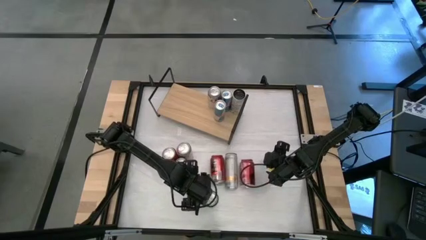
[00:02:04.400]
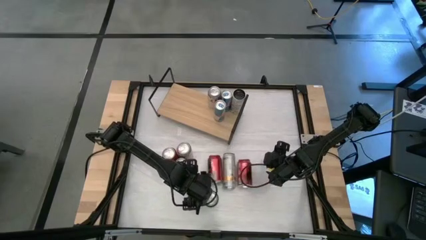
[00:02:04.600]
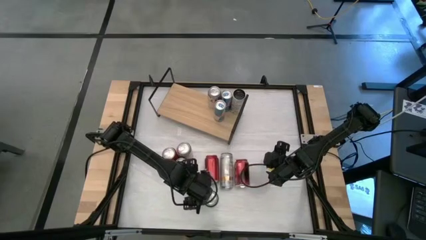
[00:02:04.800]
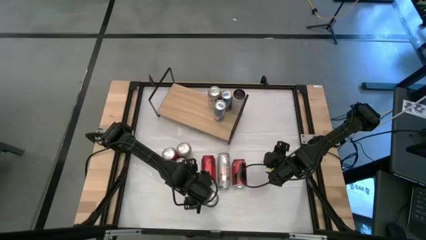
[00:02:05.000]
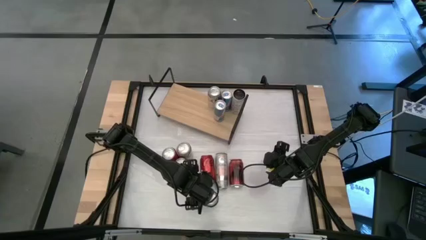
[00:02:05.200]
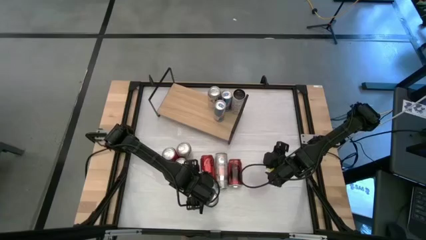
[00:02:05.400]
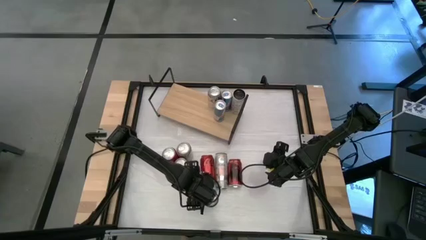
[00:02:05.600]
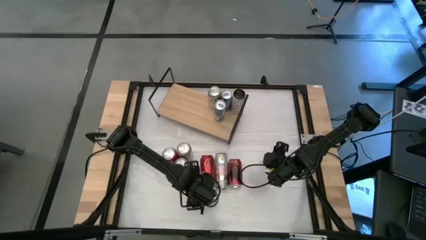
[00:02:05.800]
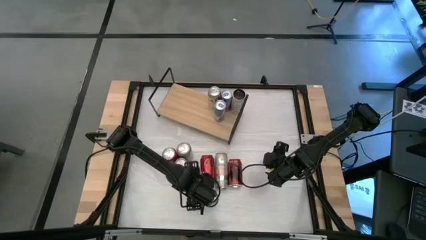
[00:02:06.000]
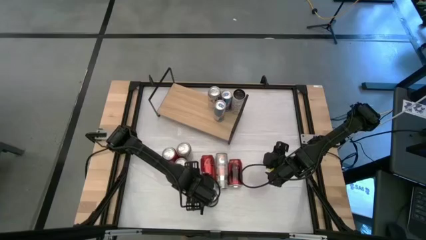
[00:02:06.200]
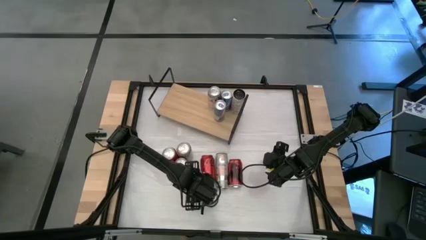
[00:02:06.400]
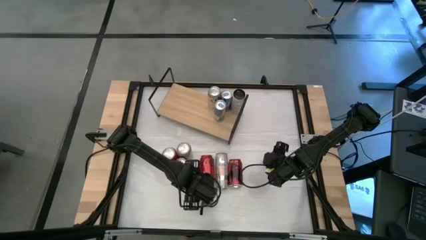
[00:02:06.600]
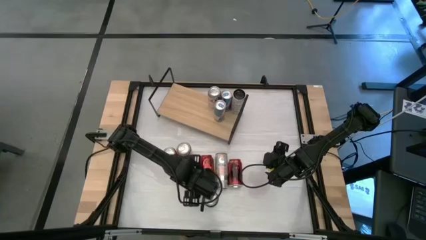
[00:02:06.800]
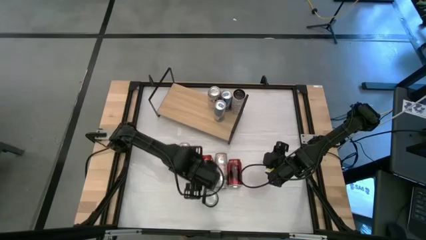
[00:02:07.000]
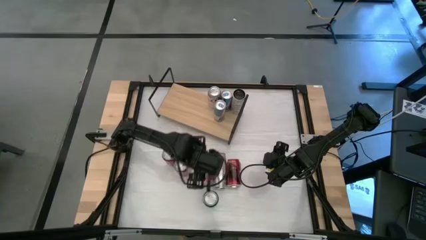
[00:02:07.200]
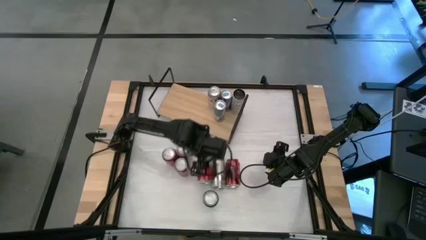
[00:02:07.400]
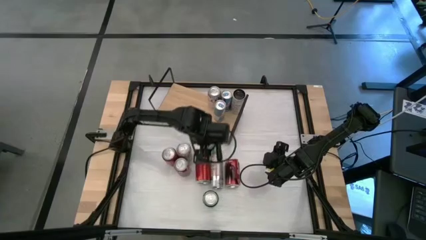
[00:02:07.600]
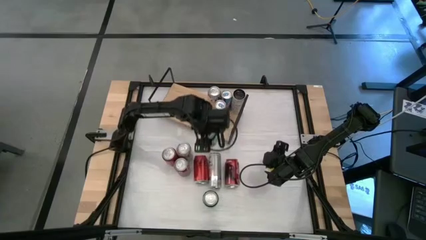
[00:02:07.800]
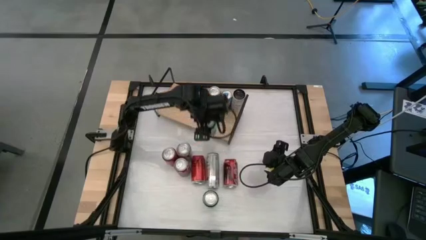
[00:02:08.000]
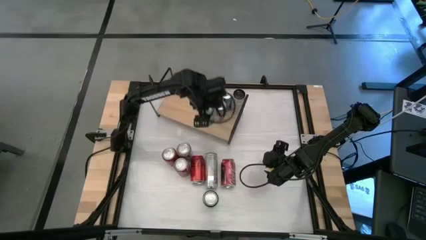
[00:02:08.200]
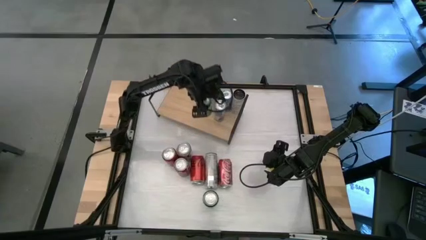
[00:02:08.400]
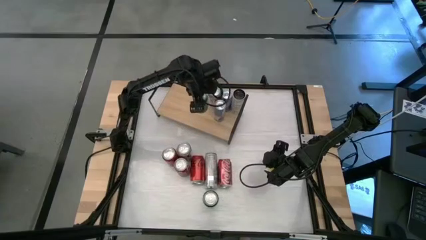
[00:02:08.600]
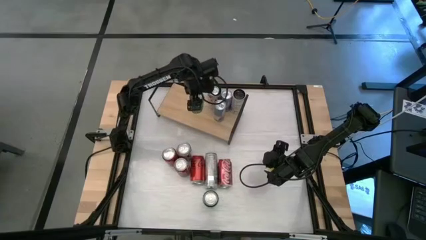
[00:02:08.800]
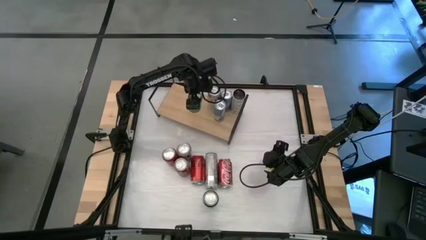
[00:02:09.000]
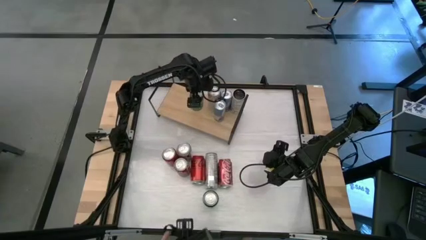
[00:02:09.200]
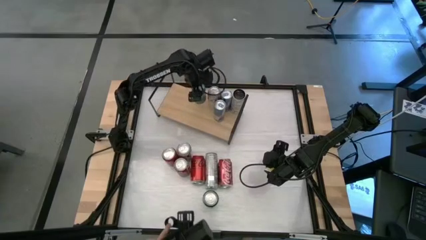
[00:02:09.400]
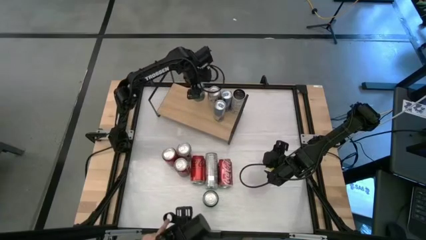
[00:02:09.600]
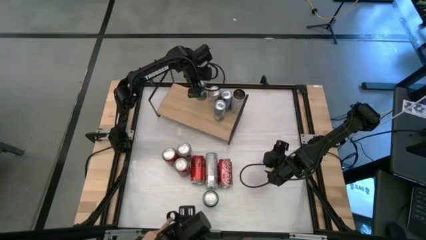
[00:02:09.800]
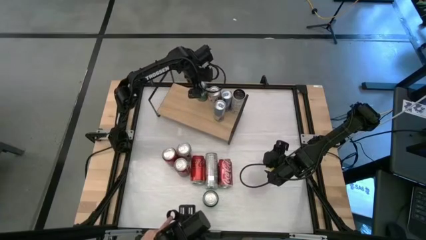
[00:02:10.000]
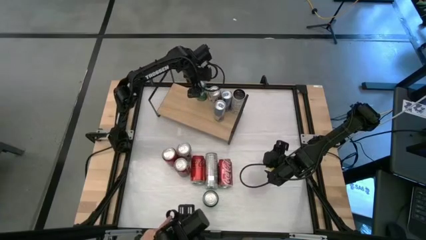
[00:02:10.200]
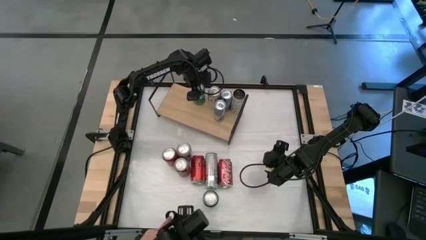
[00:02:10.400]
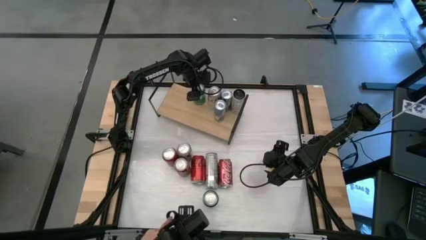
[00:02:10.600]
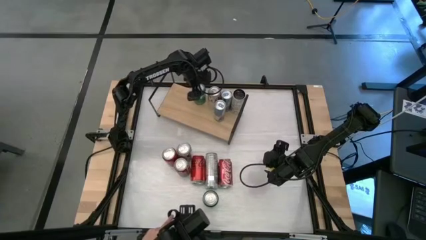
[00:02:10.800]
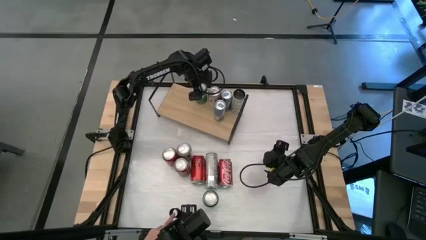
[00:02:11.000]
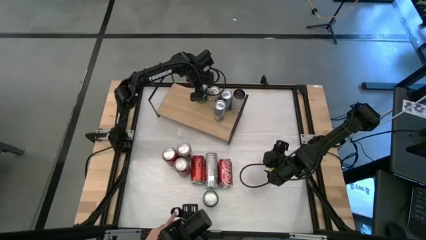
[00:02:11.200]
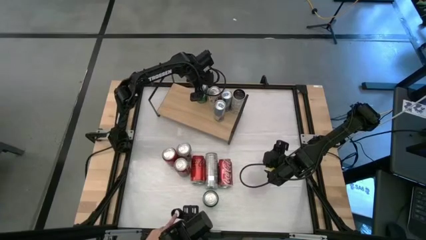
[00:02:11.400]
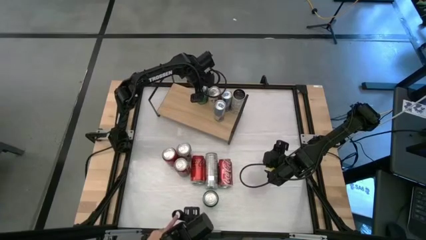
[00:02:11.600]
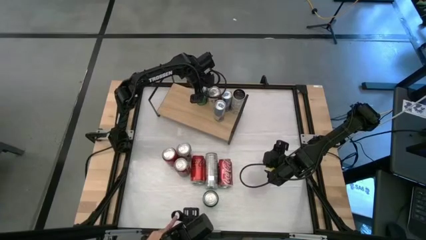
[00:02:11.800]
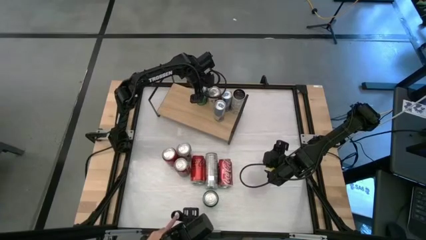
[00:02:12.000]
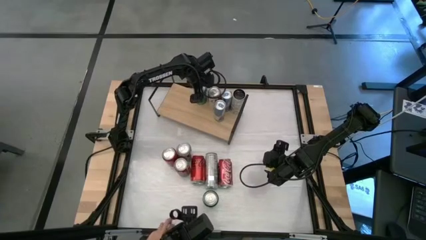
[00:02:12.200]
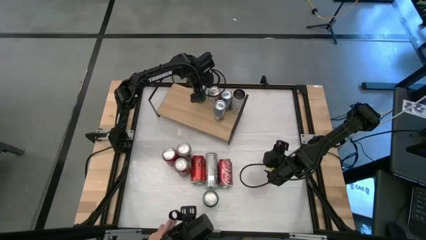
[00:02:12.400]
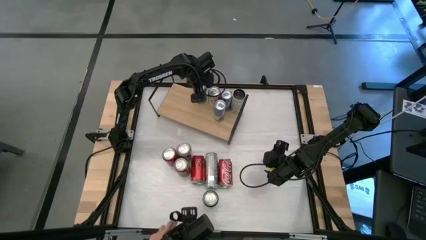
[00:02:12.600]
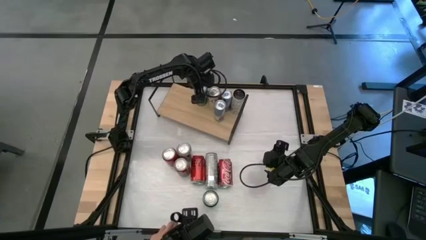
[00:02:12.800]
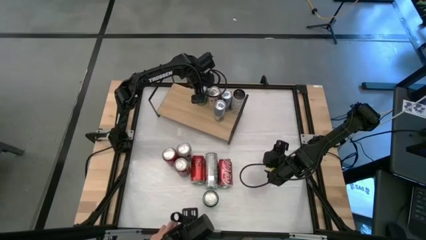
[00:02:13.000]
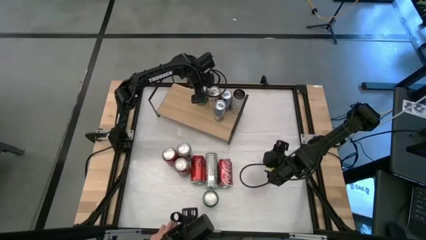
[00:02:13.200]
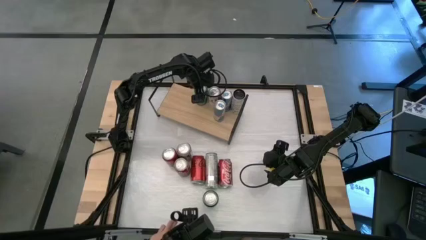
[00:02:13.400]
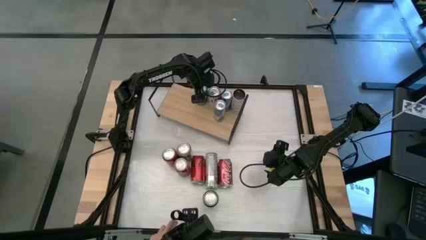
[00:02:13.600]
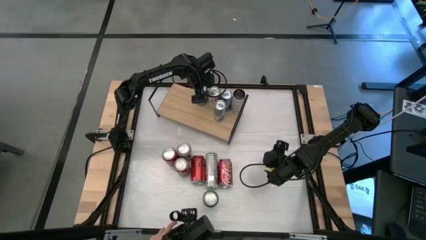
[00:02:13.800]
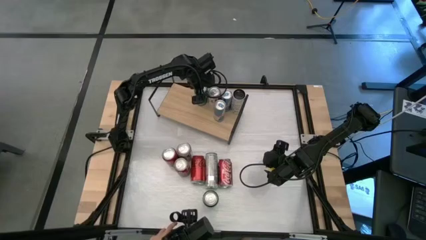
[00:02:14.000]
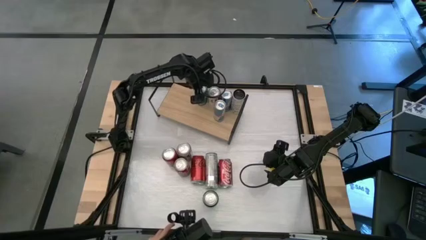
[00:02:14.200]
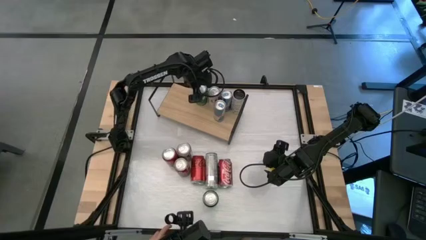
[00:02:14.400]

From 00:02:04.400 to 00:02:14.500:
Task: Place canned beverage on shelf
Put the left green soda can on the shelf

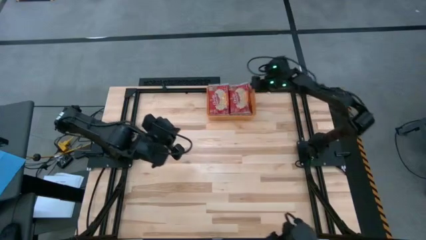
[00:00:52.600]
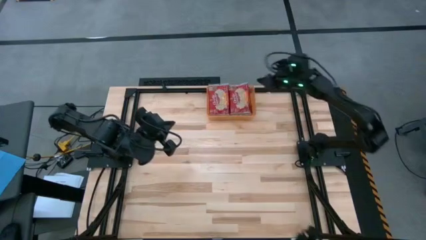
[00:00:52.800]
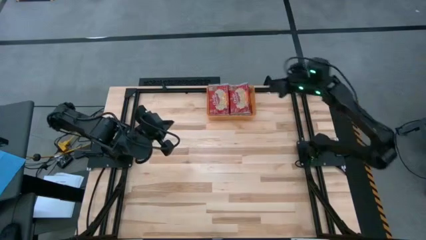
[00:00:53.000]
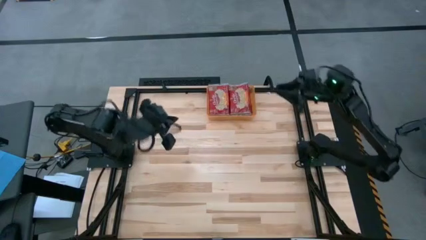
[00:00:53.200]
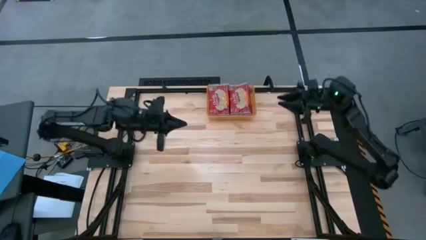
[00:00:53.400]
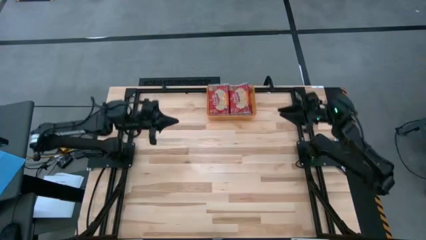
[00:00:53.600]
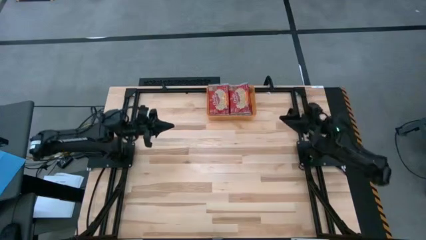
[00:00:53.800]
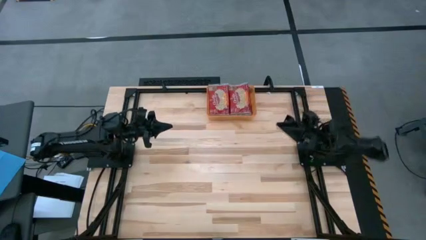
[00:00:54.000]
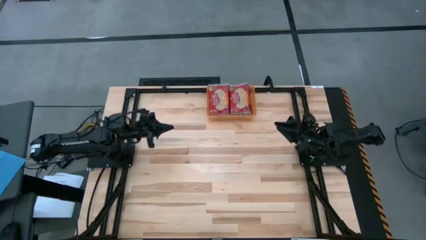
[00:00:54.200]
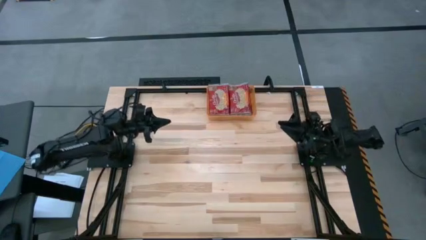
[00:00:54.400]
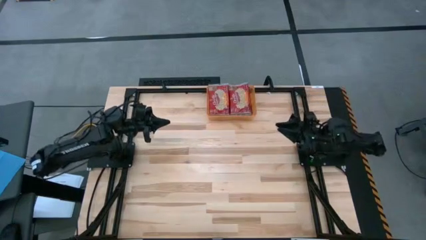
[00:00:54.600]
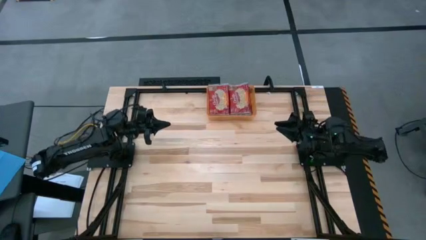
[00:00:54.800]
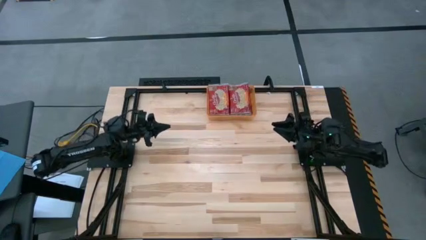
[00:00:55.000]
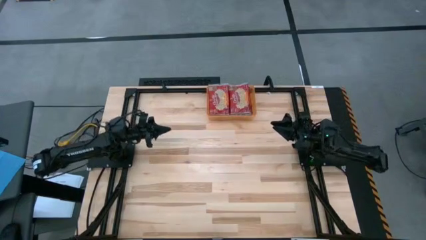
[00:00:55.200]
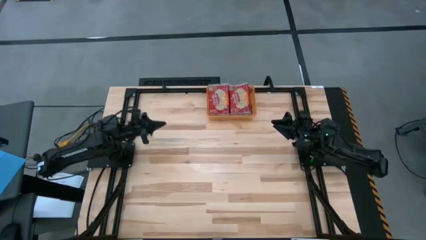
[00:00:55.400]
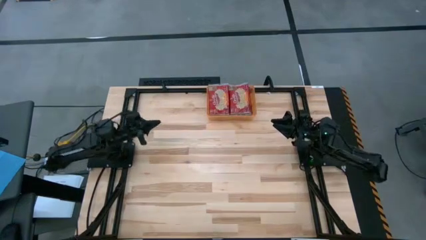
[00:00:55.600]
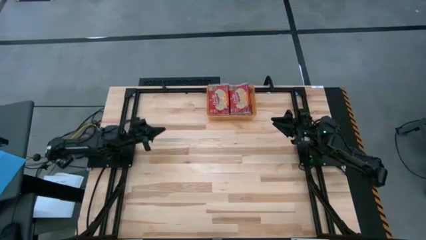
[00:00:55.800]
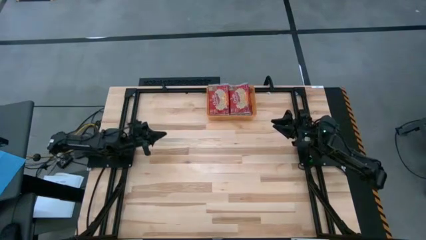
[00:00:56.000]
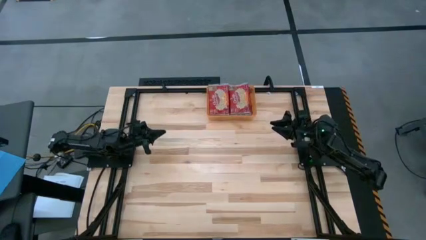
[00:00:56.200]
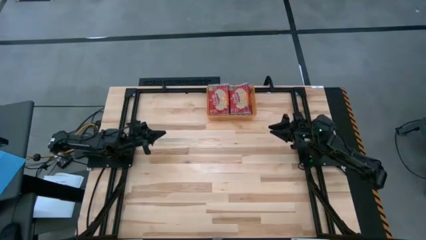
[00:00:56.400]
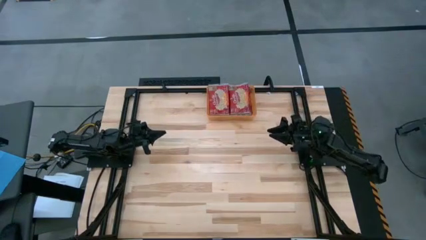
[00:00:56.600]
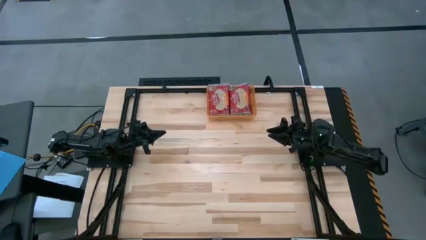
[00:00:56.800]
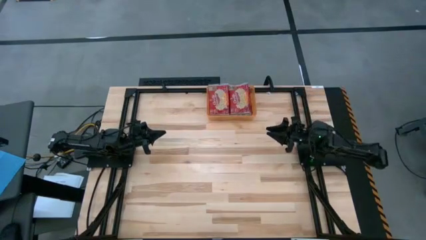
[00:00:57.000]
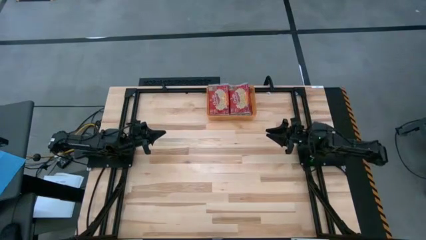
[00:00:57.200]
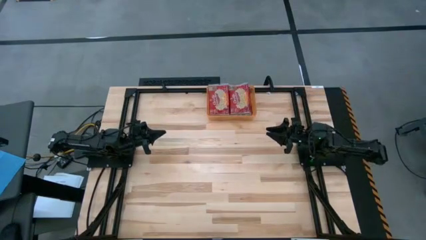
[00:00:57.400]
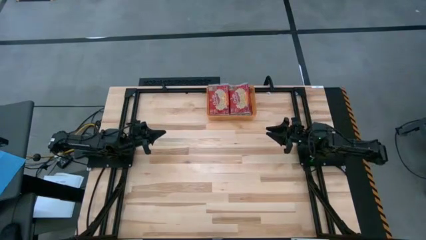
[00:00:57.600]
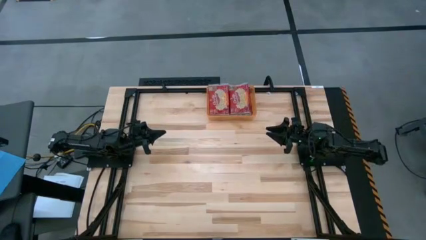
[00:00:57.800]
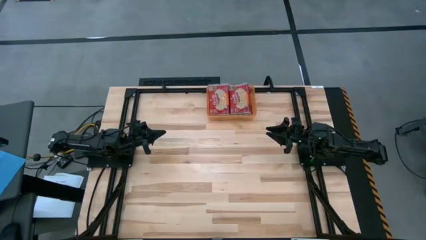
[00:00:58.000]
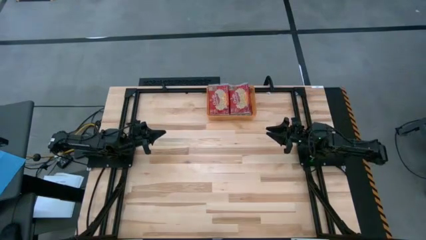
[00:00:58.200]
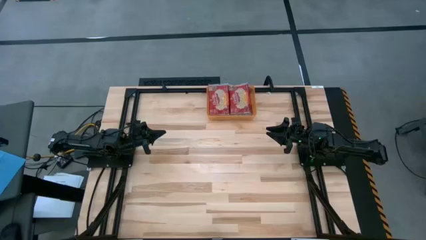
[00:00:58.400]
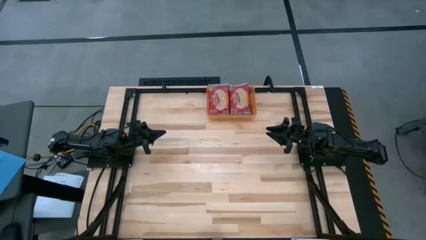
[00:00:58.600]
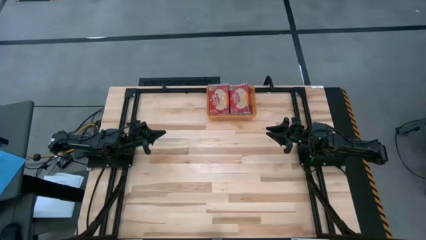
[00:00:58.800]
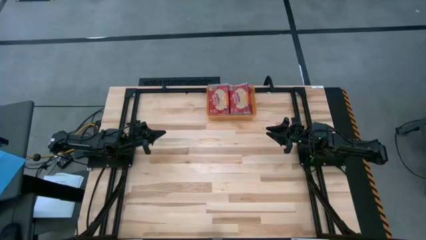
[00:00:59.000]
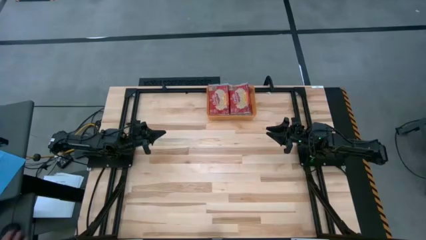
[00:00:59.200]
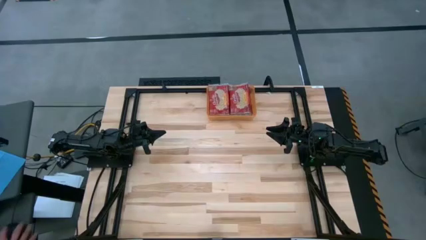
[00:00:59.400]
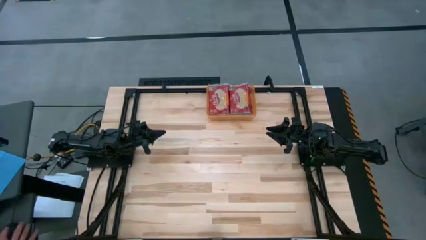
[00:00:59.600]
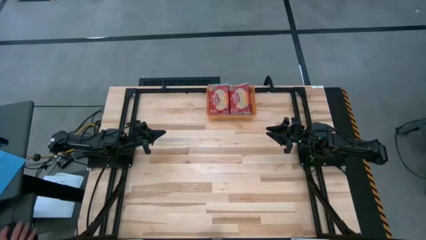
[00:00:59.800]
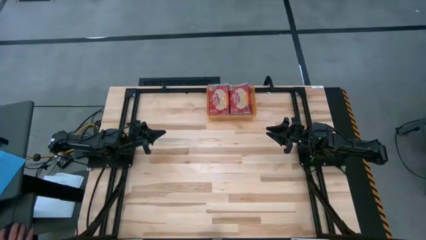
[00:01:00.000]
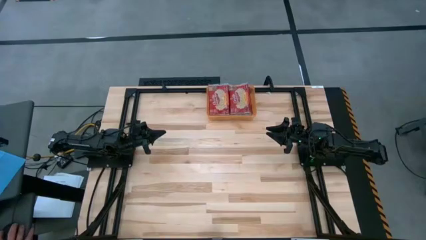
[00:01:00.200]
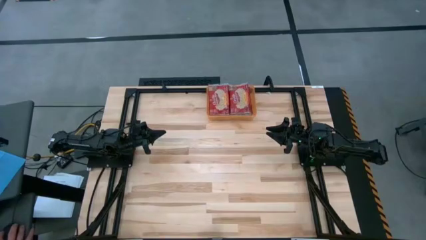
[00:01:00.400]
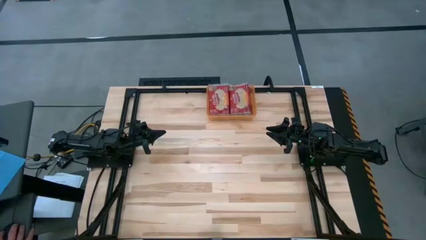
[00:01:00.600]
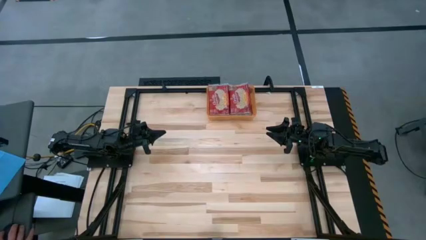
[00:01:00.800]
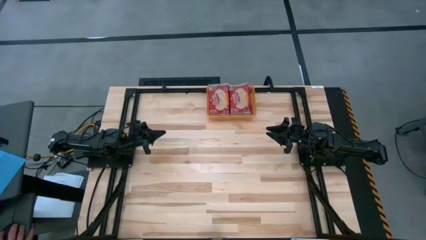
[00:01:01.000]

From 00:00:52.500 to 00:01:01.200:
Task: Sort popcorn bags into baskets
Return to Home Position
